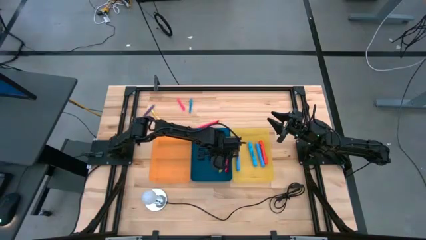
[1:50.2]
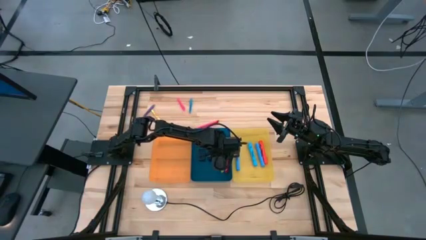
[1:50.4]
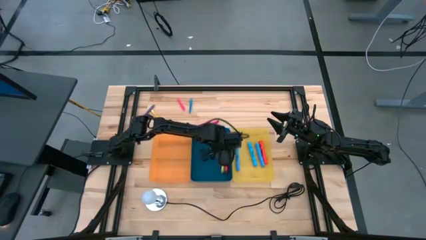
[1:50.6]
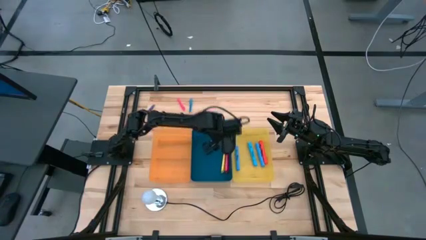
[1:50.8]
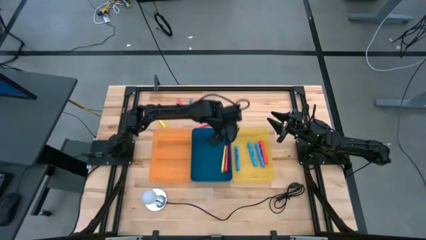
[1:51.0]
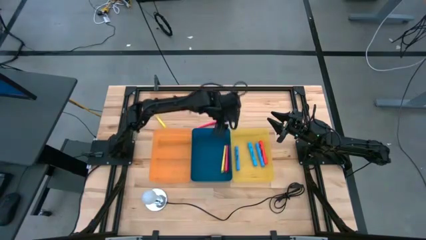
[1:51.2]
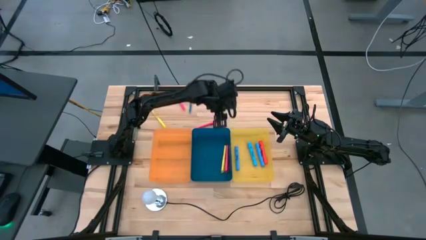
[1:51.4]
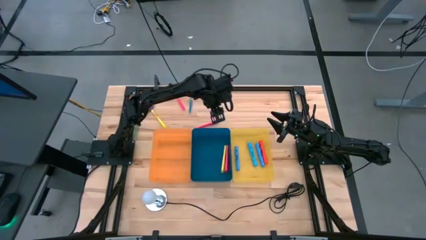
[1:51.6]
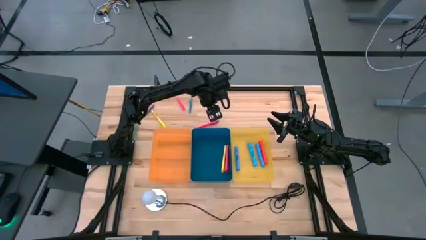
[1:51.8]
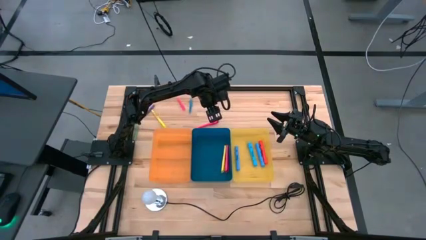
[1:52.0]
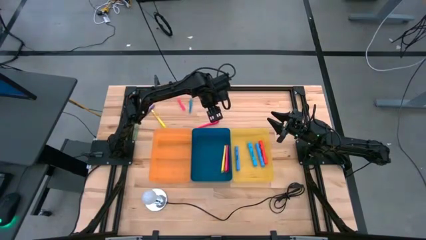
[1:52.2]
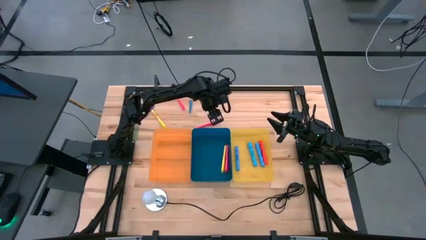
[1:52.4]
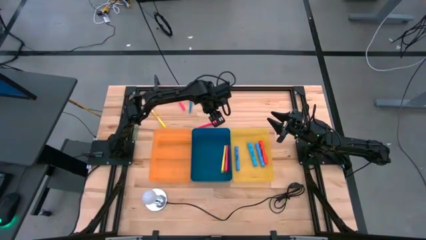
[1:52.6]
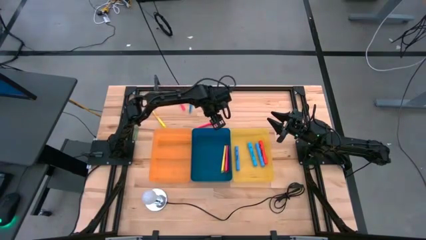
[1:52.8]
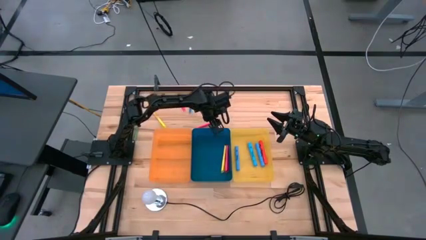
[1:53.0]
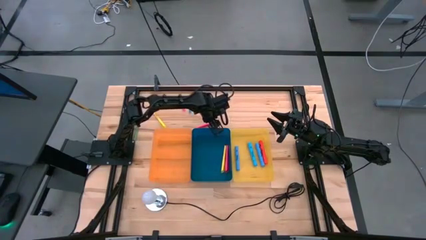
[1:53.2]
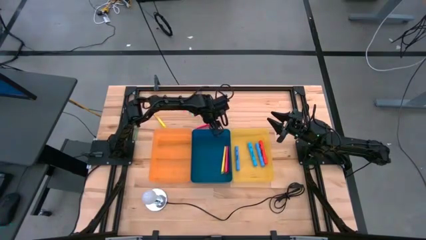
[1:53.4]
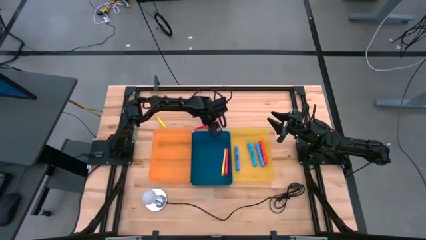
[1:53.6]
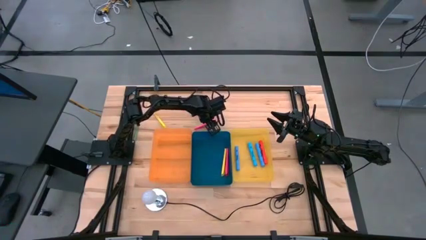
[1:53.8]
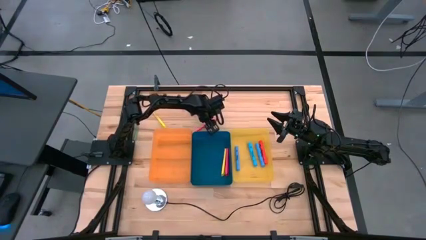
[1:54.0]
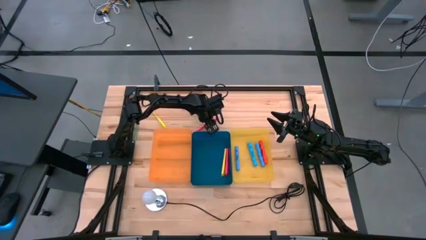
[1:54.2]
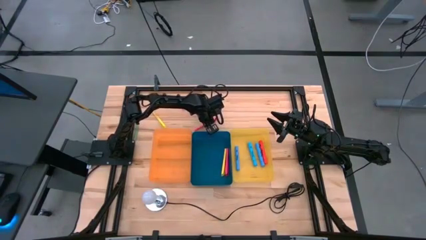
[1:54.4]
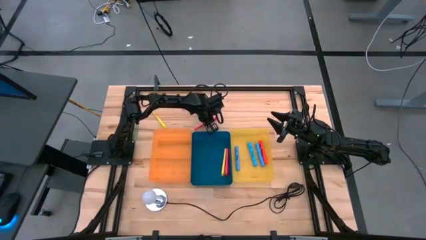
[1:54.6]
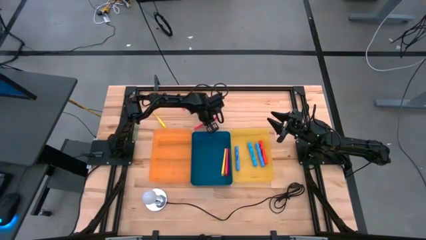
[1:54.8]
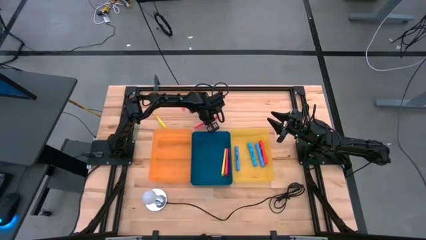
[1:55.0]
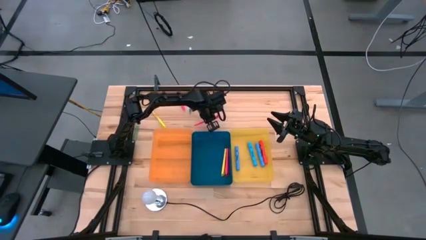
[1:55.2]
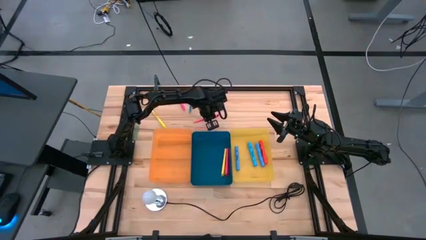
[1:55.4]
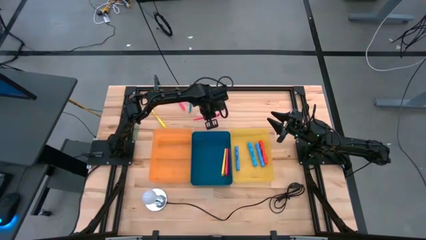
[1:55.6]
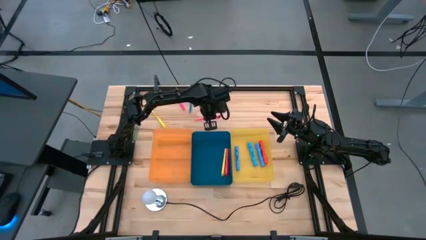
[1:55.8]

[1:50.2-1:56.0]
Task: Pick & Place Markers
Put the pink pen into the blue bin

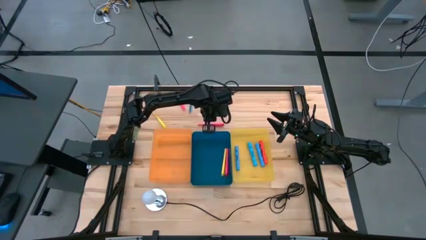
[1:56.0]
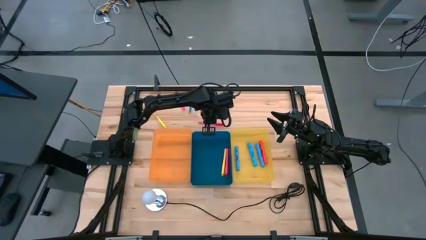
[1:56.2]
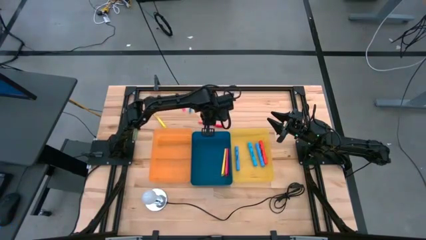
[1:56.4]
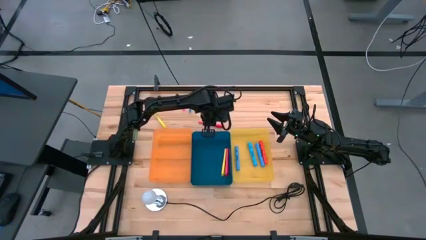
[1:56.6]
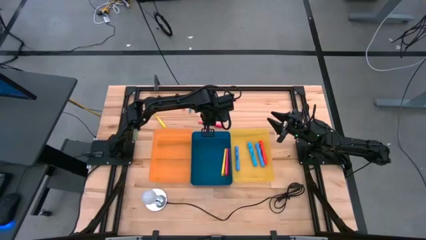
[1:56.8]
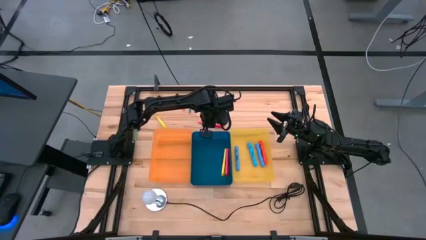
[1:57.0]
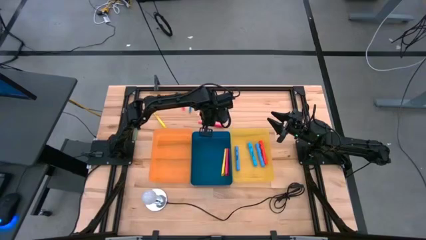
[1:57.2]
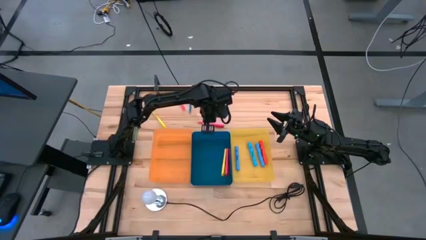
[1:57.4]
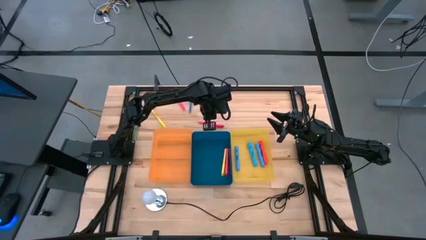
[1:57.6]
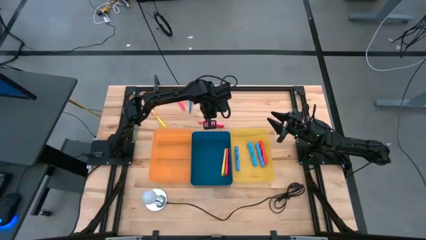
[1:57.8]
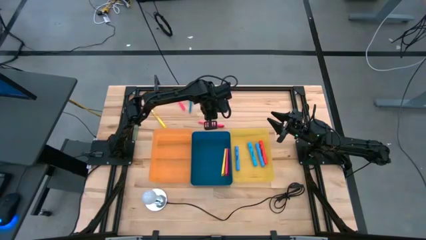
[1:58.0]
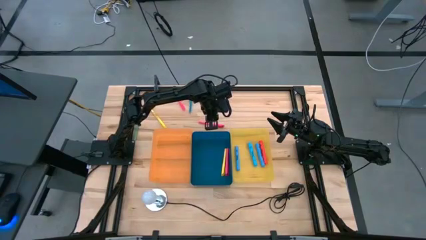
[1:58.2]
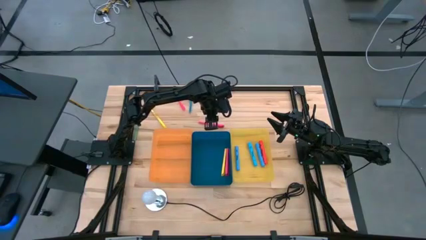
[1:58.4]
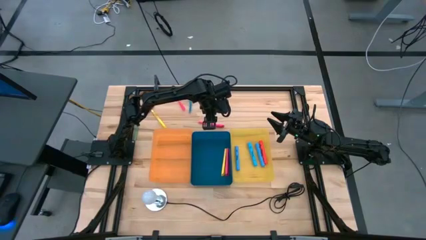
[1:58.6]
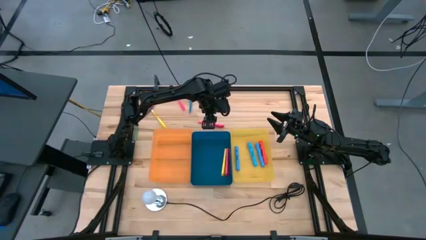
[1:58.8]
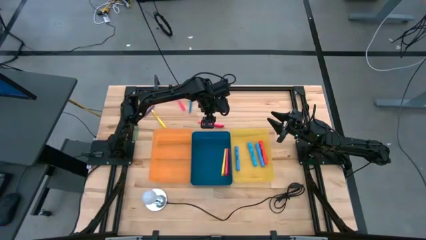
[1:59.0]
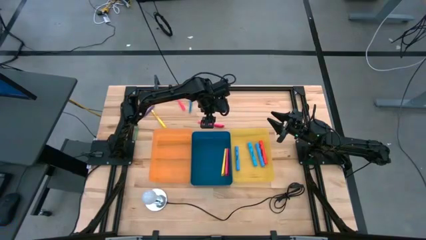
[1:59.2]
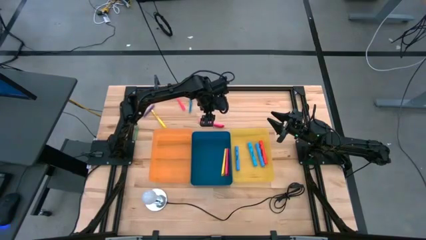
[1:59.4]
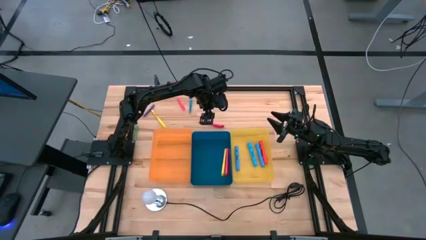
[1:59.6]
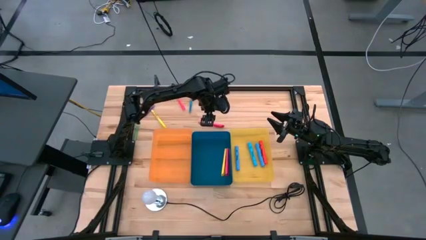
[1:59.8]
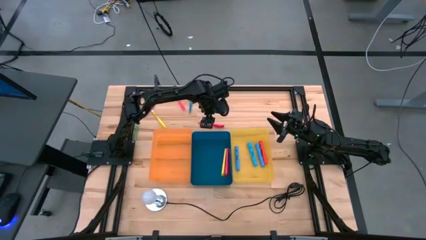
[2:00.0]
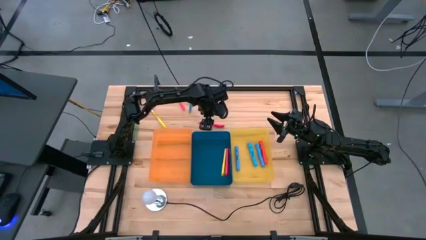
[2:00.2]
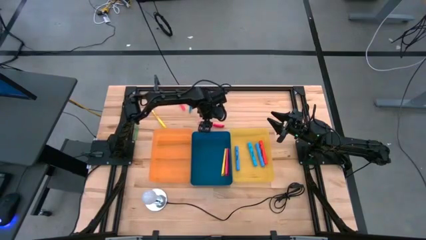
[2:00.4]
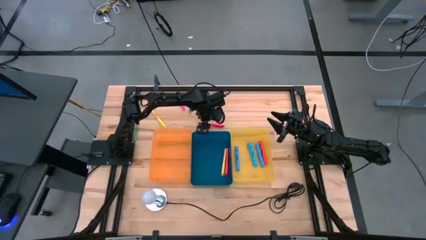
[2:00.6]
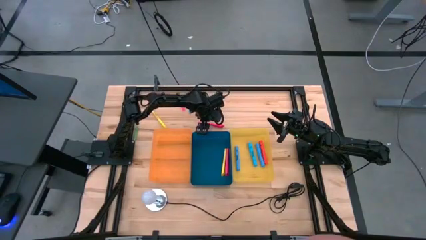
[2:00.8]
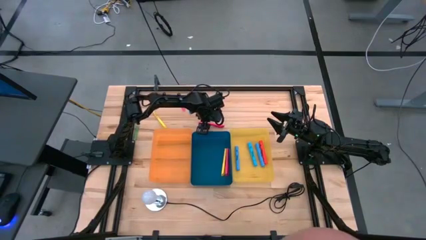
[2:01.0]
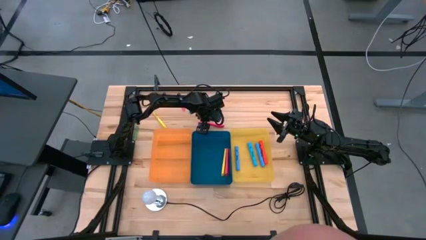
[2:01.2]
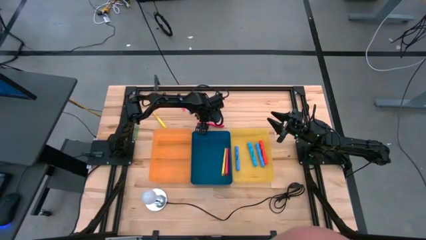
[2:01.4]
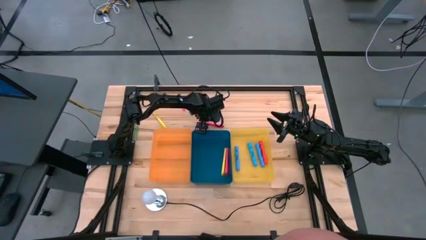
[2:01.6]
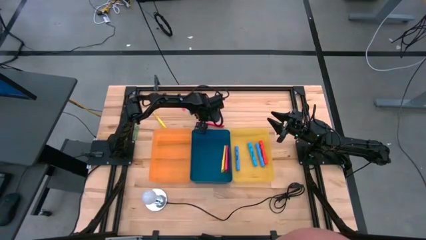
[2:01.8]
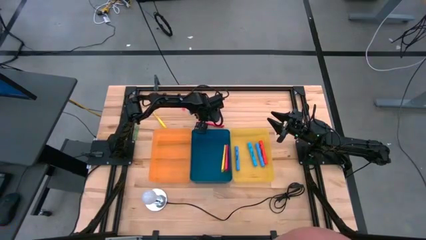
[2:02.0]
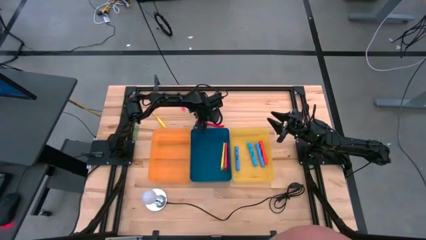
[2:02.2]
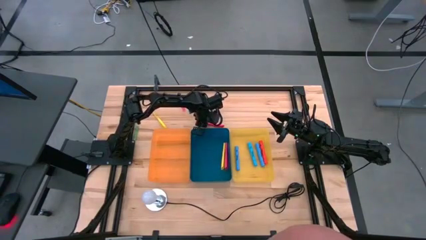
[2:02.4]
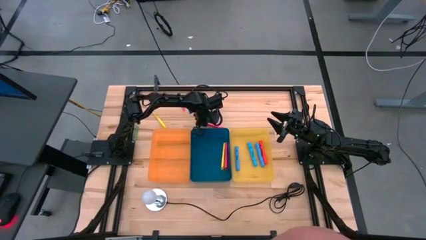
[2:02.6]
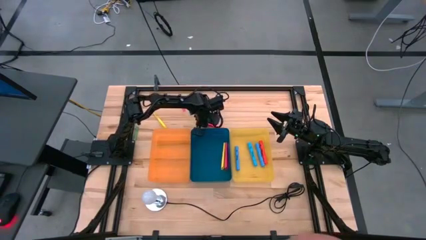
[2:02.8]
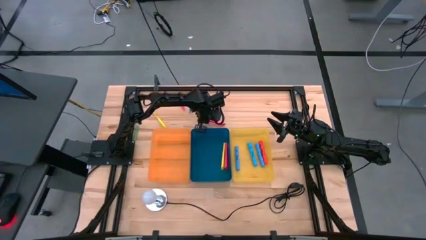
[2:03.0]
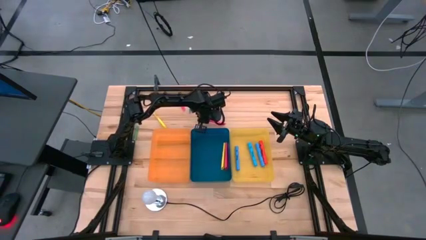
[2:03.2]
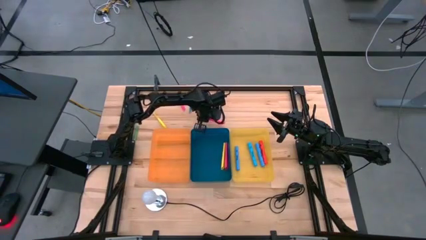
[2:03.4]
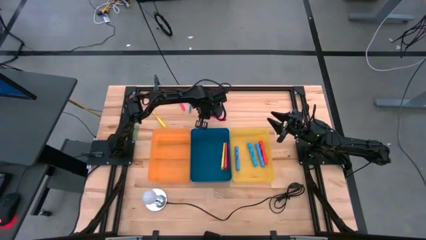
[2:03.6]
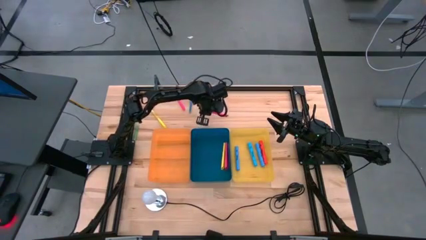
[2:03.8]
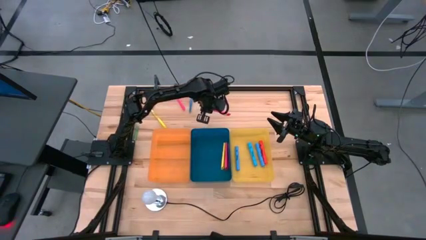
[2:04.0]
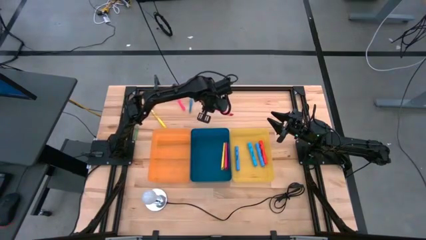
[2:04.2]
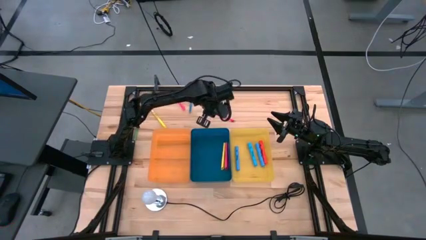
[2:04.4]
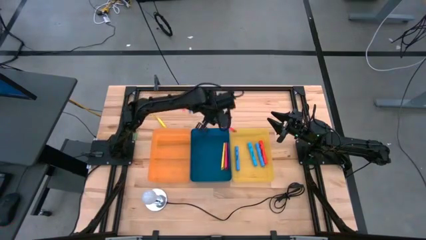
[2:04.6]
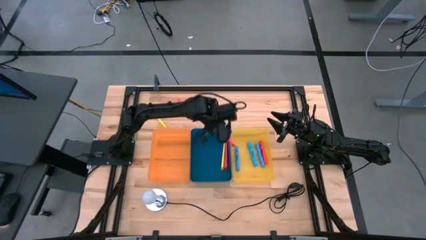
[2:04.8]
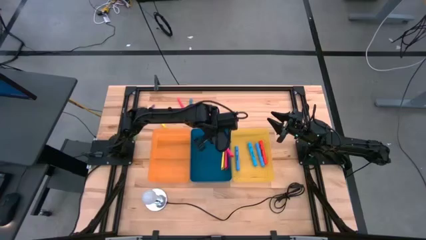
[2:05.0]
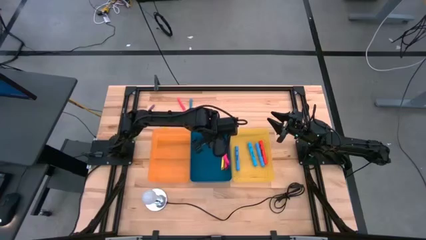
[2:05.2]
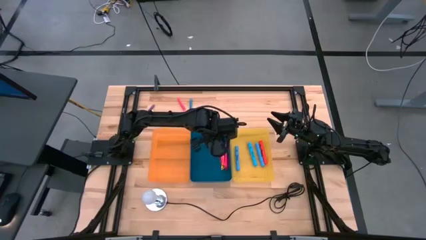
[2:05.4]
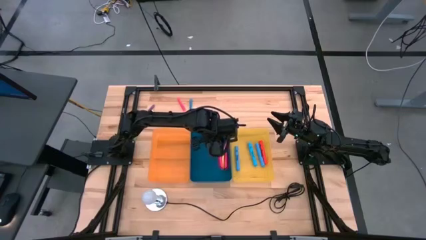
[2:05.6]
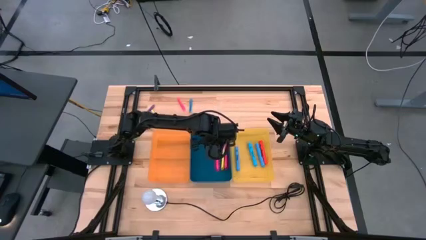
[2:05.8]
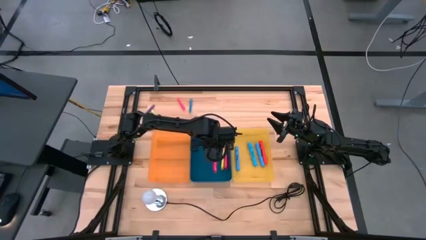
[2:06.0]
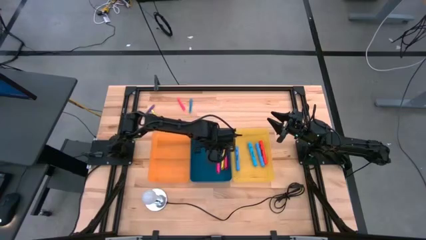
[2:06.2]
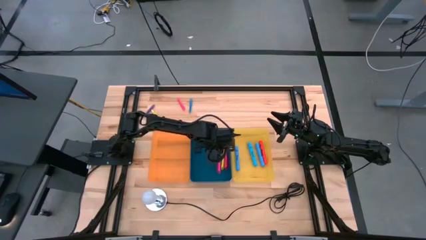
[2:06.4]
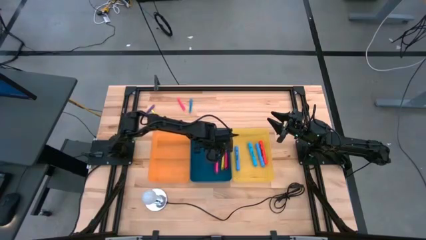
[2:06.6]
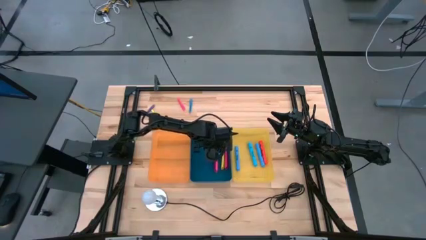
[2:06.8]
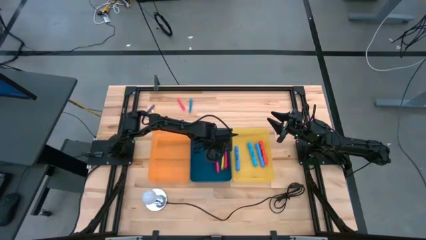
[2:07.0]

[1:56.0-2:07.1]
Put the pink pen into the blue bin
